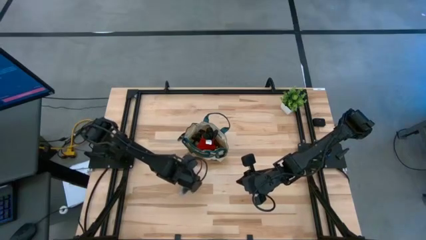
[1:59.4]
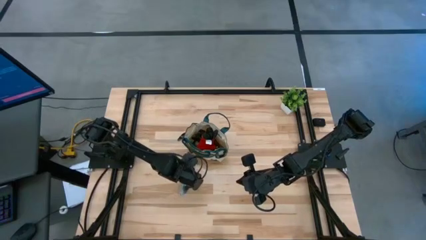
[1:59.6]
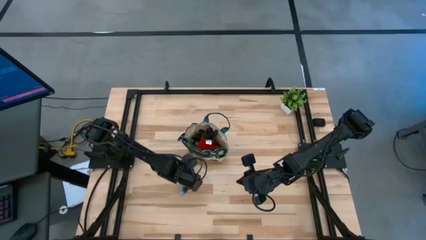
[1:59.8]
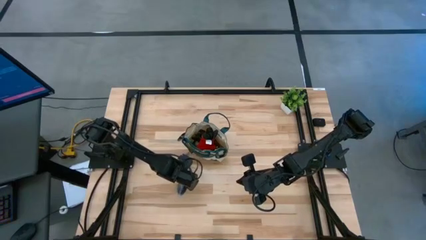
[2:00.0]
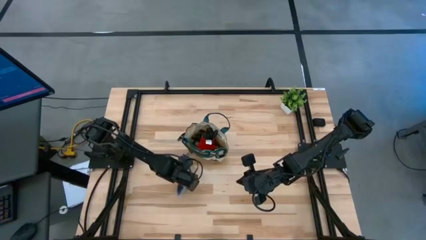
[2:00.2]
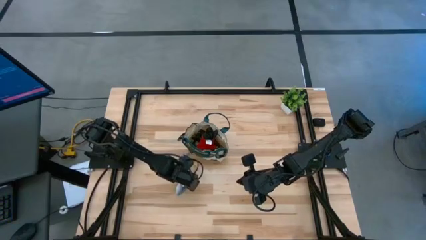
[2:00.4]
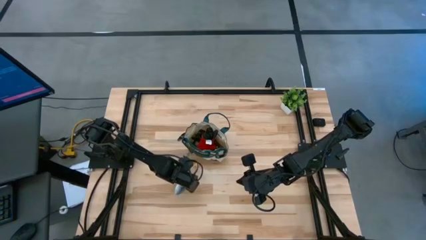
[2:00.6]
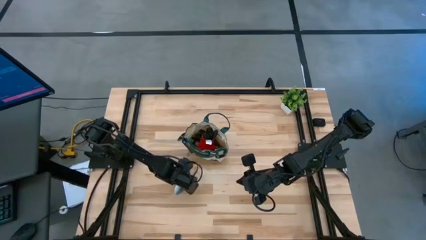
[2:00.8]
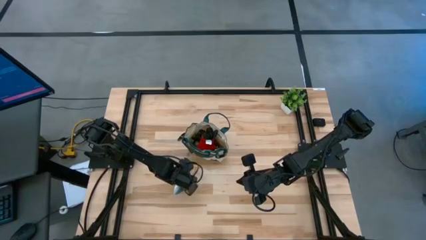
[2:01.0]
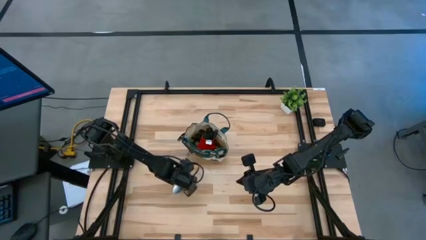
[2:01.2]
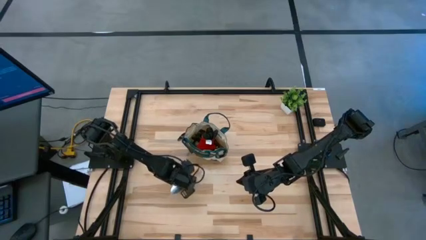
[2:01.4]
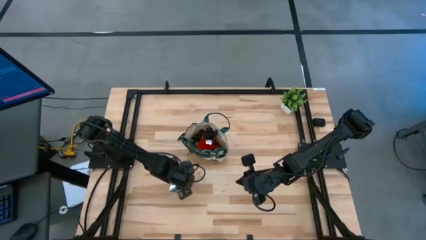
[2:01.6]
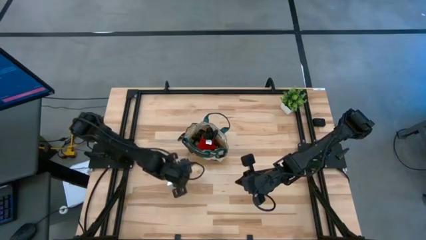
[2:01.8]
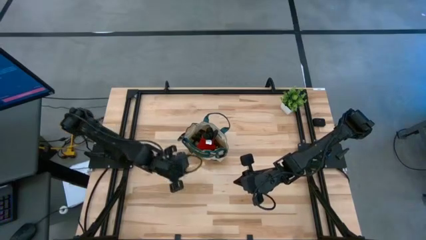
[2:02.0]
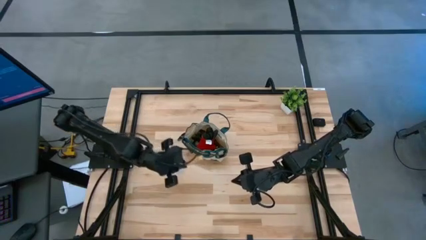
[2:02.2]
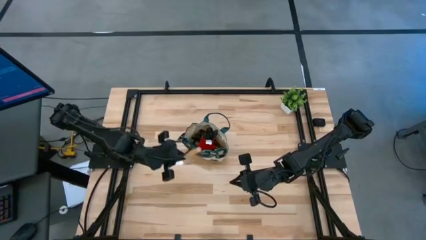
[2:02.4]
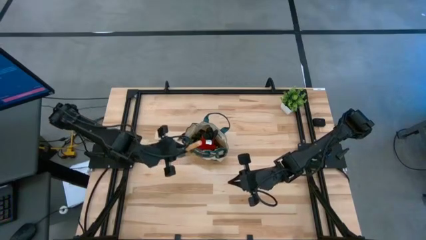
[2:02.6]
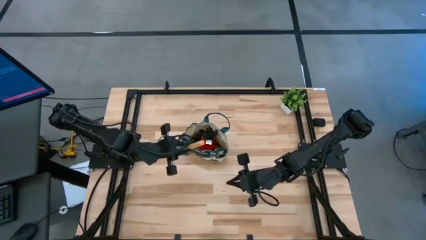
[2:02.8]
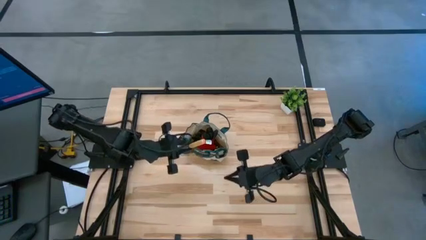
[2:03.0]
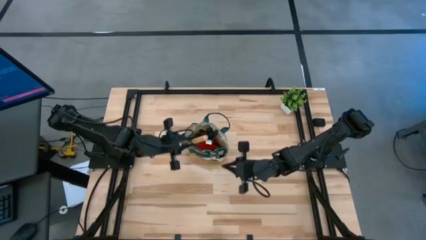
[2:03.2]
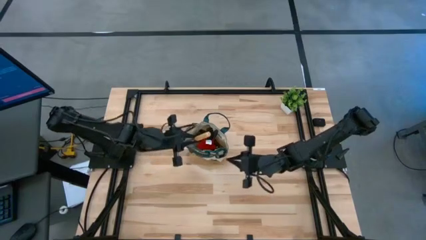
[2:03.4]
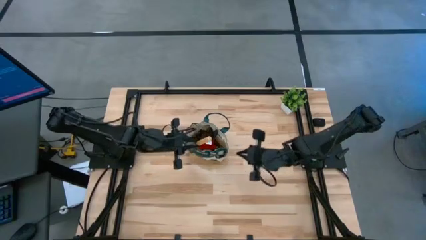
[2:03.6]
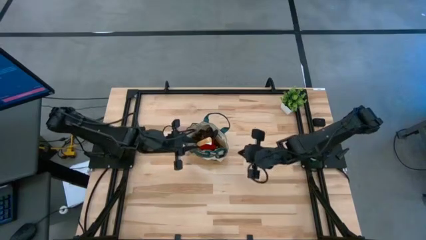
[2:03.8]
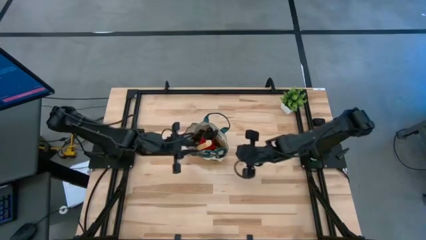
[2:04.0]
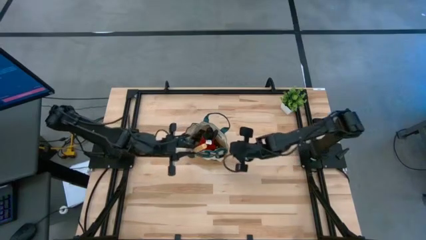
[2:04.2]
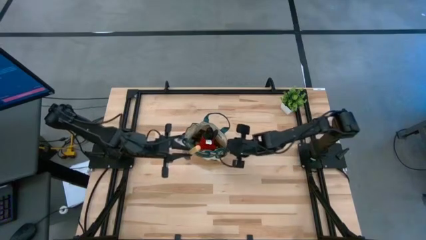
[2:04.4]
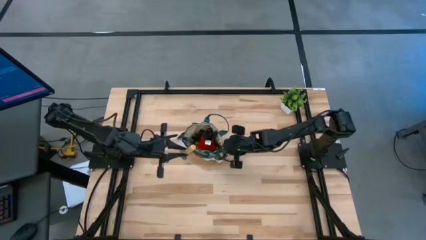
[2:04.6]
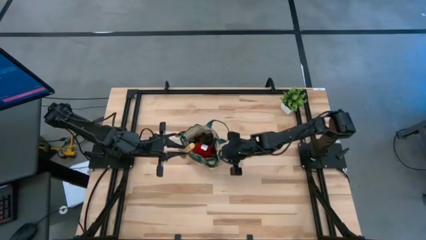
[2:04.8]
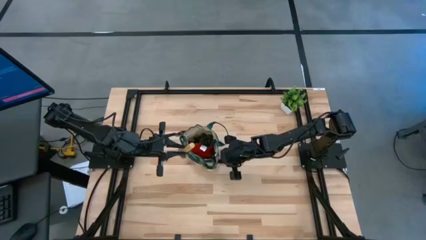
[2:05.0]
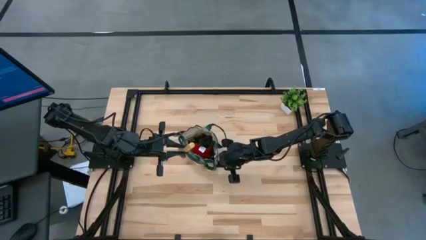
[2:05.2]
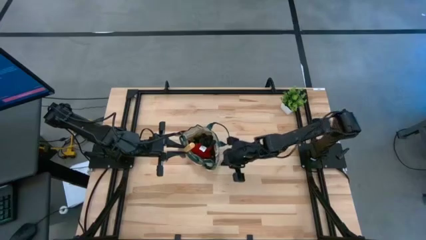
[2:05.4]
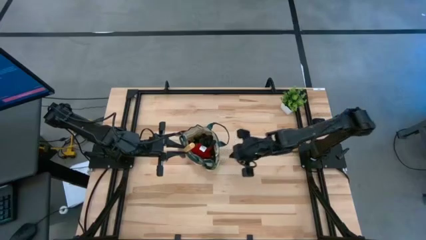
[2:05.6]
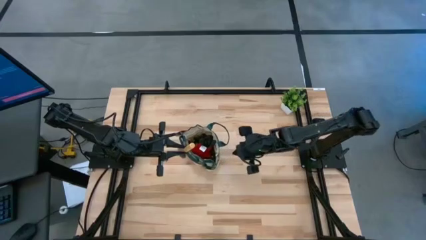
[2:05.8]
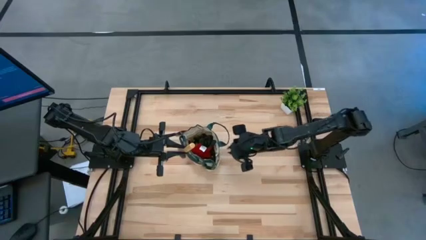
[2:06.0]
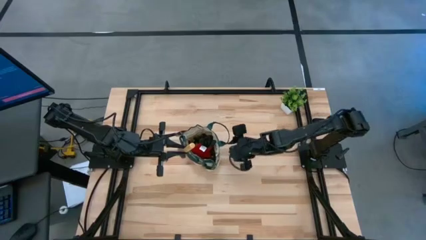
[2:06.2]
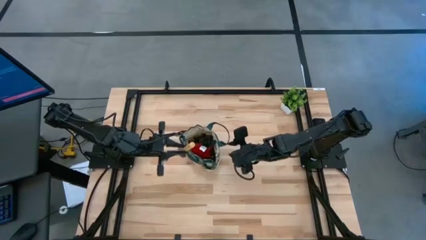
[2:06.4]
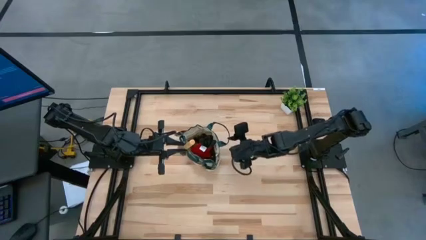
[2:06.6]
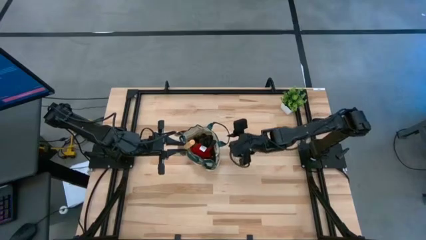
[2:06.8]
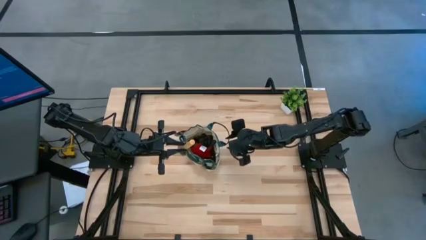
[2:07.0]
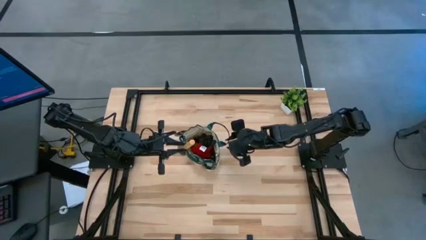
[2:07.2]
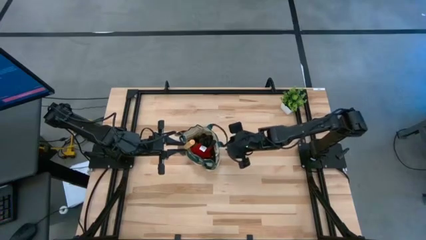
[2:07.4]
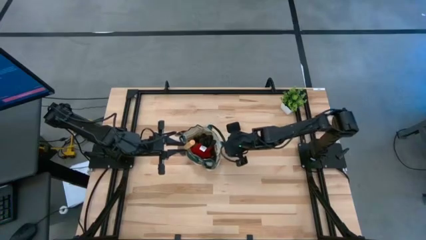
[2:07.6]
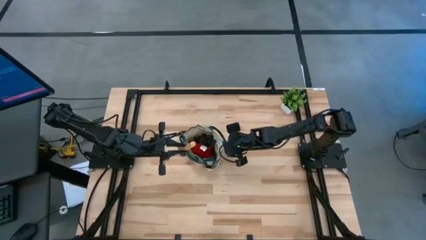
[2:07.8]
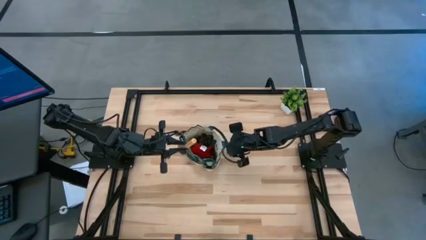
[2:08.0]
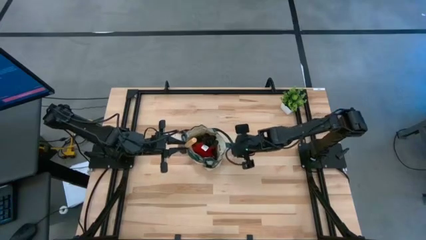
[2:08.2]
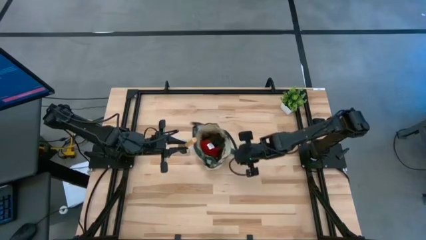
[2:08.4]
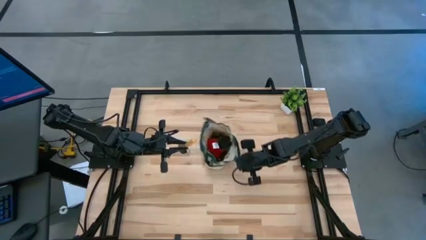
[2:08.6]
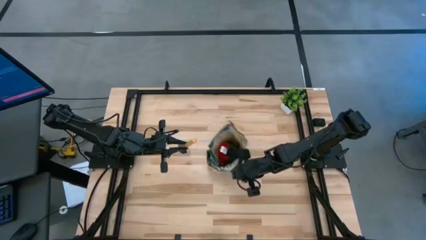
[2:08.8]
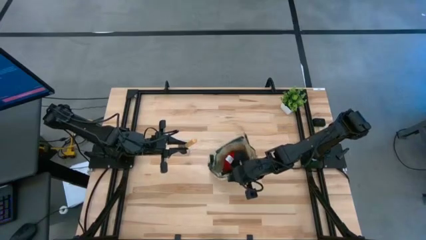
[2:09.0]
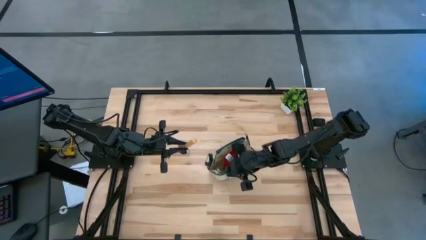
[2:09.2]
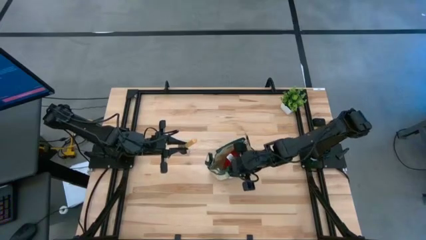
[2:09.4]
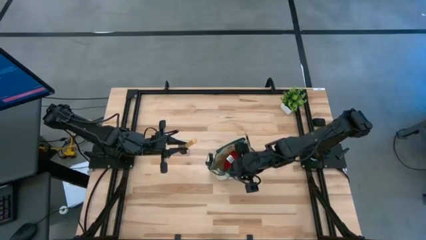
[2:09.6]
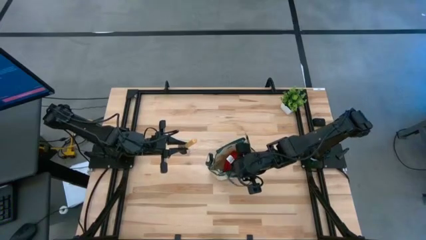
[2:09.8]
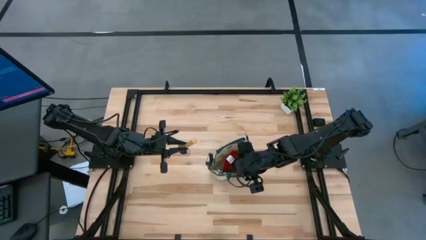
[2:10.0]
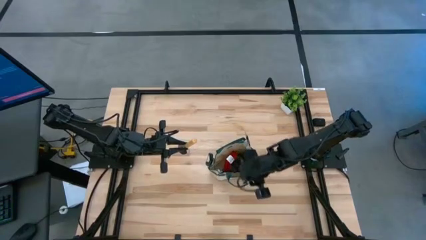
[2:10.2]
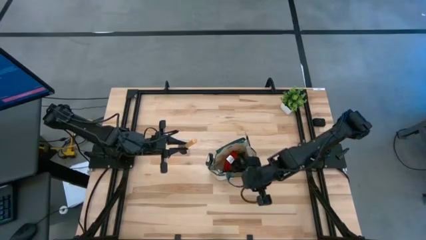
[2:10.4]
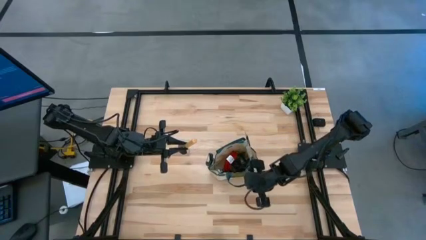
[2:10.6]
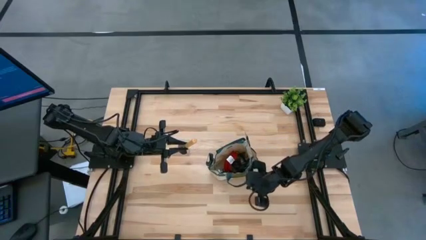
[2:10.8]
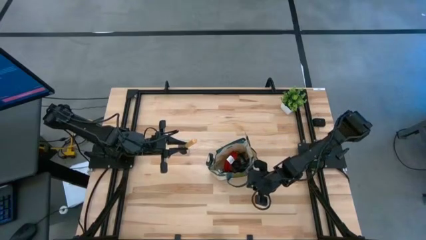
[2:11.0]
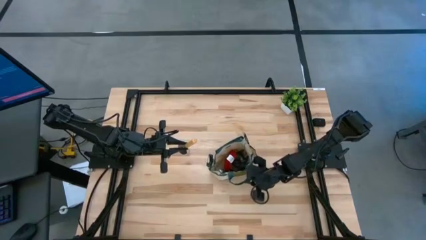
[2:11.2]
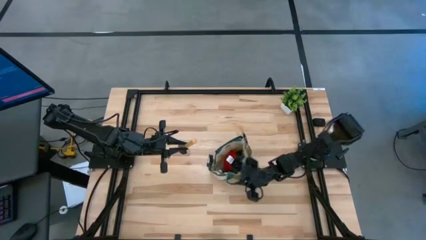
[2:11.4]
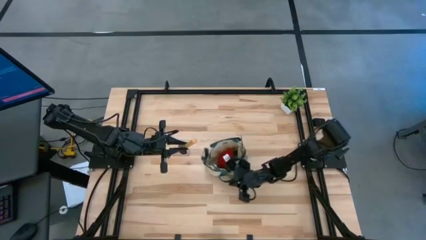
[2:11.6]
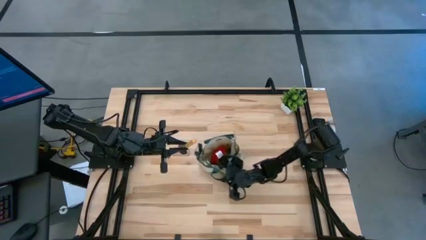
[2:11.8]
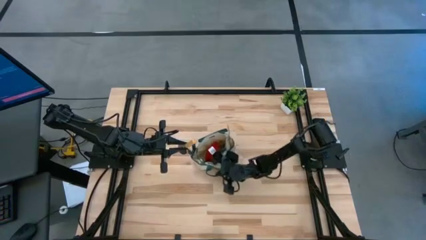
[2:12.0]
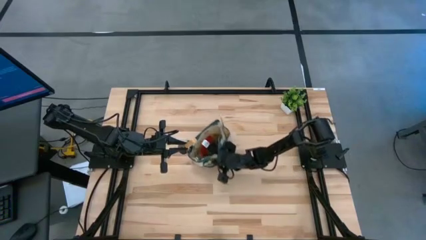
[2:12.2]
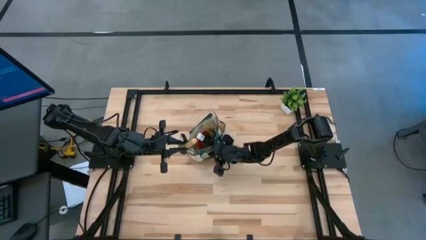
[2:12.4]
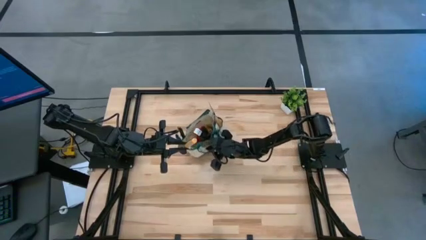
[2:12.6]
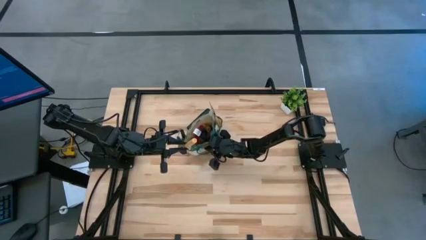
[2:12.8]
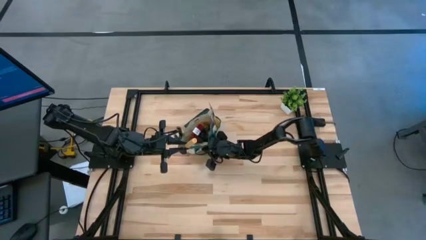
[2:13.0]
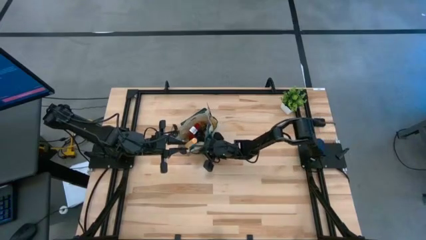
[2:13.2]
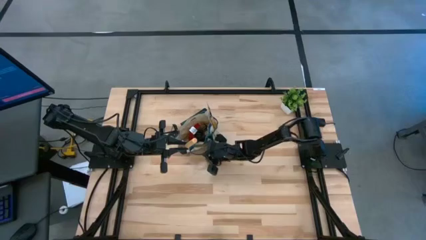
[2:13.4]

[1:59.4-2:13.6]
Task: Pick & Place Garden tools in Gardening bag
Put the brown trowel into the brown gardening bag

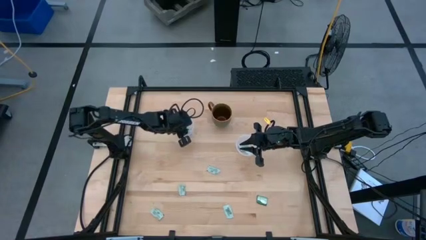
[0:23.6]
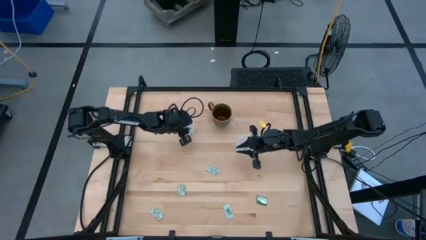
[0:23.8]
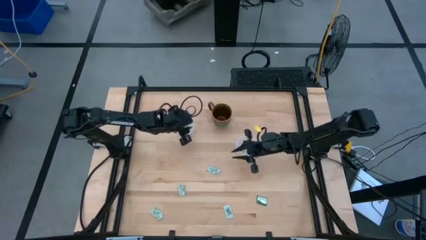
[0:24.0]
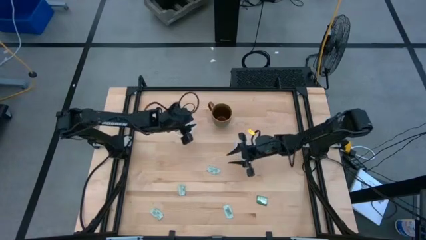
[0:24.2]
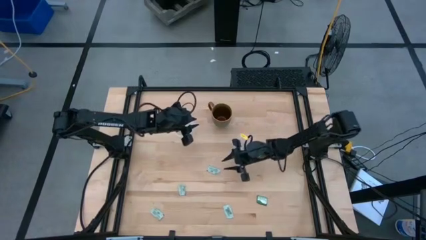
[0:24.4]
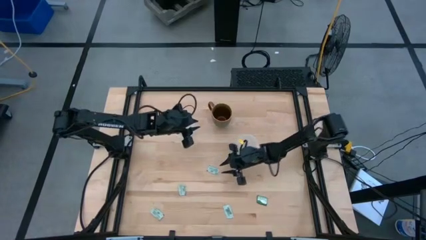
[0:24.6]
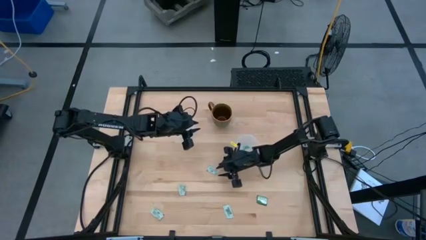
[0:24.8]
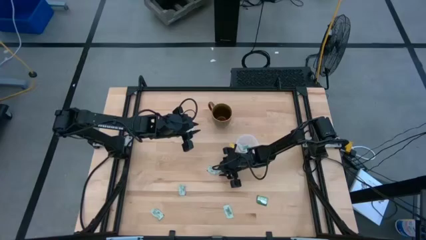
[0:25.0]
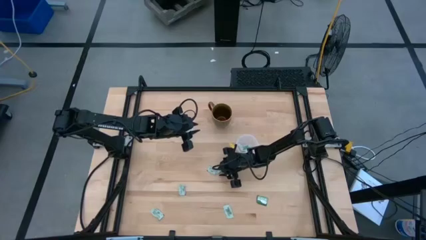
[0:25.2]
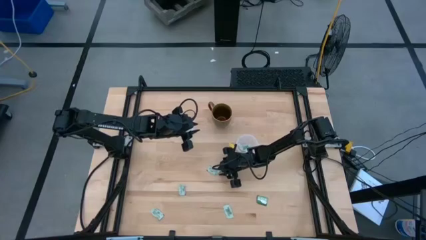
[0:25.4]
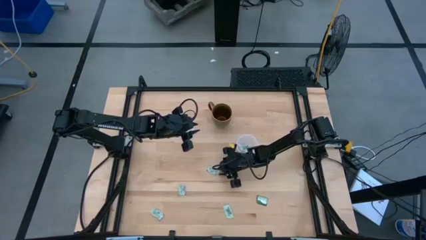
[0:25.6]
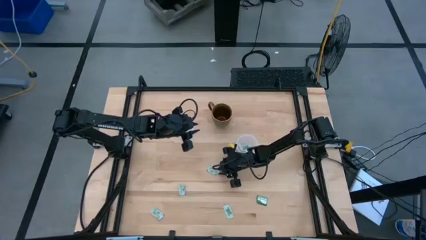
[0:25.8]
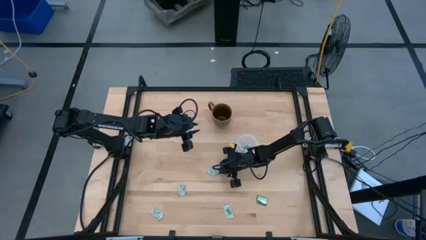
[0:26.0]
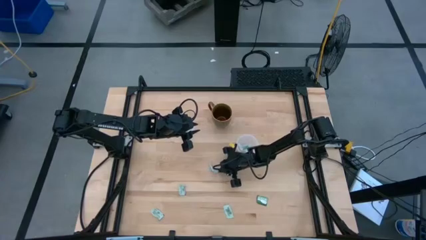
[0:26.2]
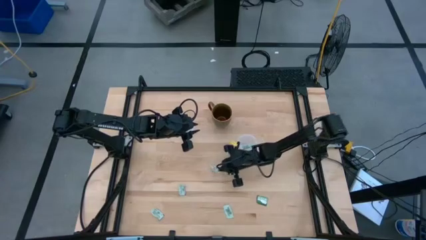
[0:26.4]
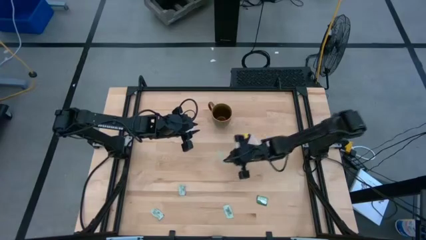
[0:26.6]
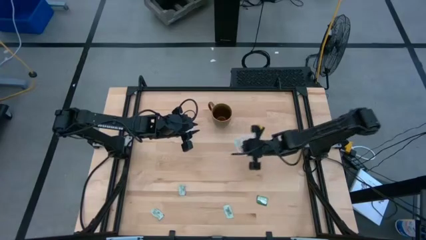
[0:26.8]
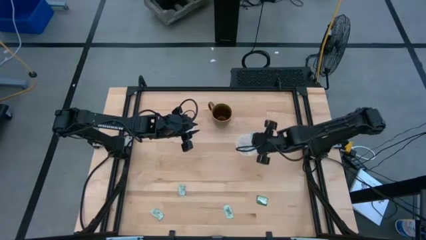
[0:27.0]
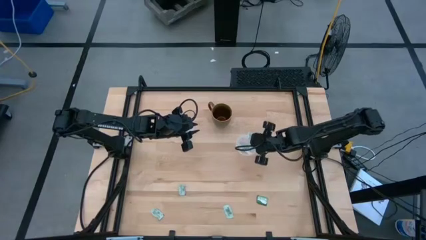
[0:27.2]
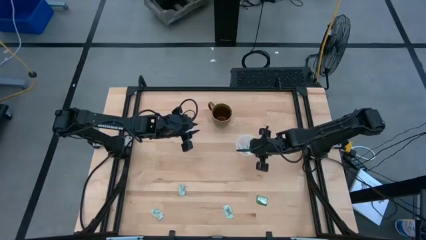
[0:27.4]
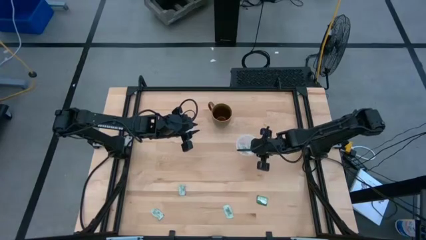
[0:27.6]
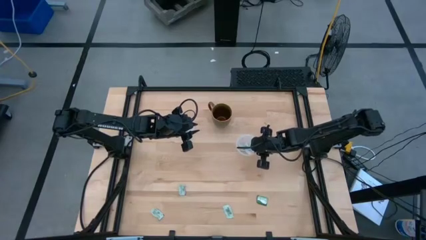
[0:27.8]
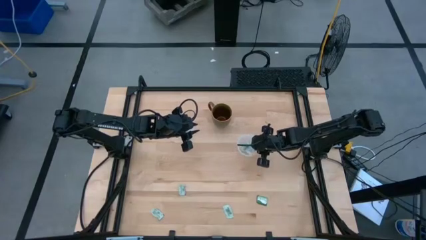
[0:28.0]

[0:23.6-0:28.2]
Task: Pick and place Stevia / Truvia into bins
Put the white stevia packet into the right round transparent container
